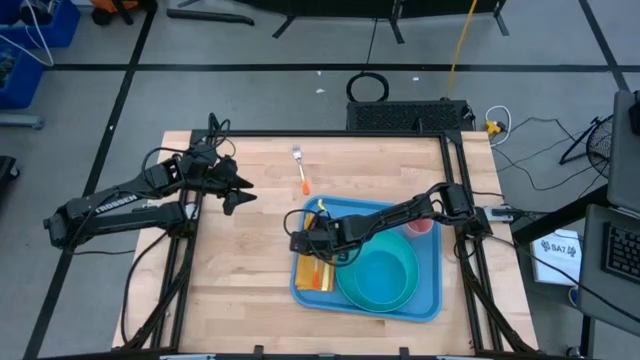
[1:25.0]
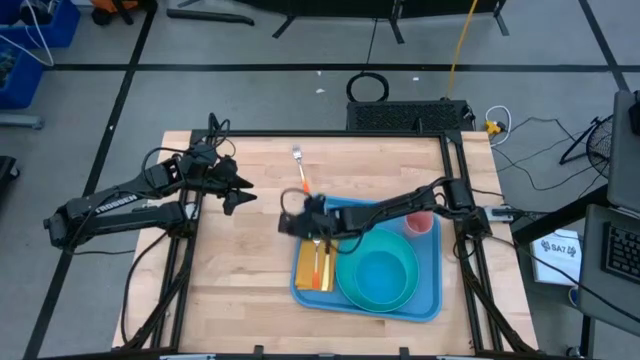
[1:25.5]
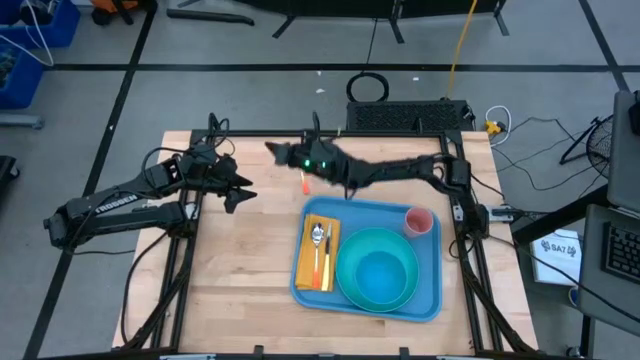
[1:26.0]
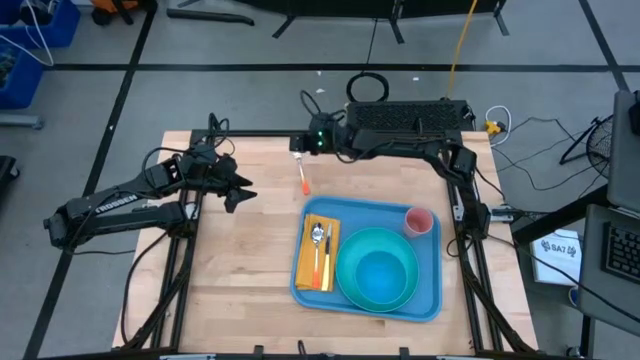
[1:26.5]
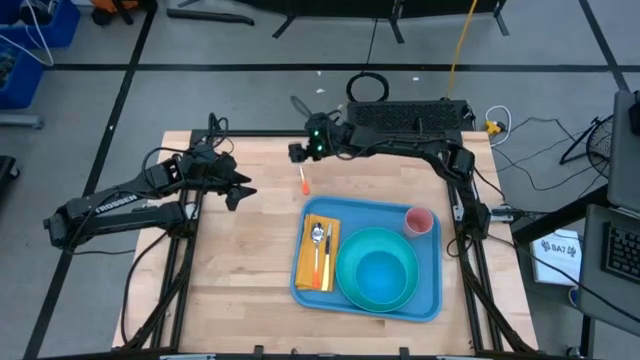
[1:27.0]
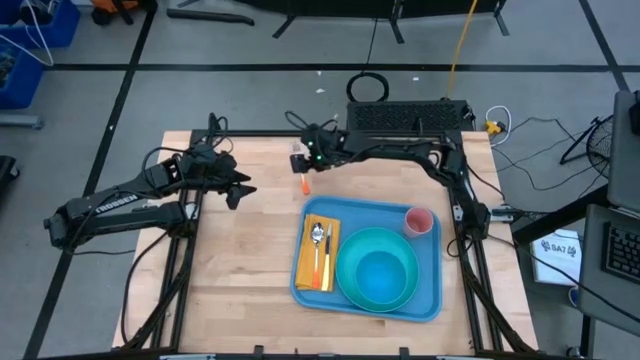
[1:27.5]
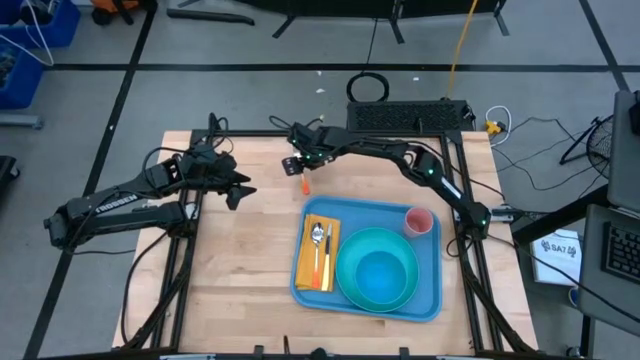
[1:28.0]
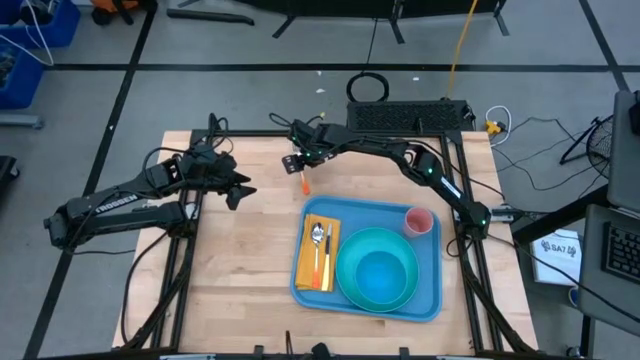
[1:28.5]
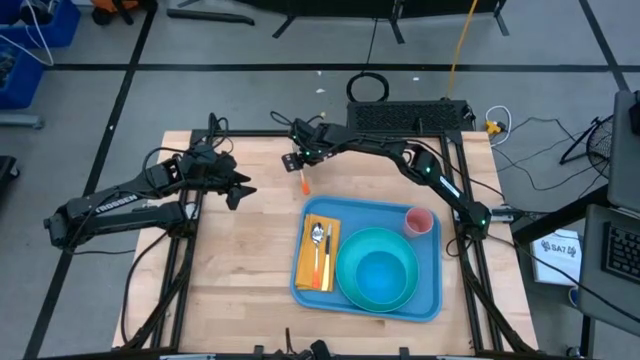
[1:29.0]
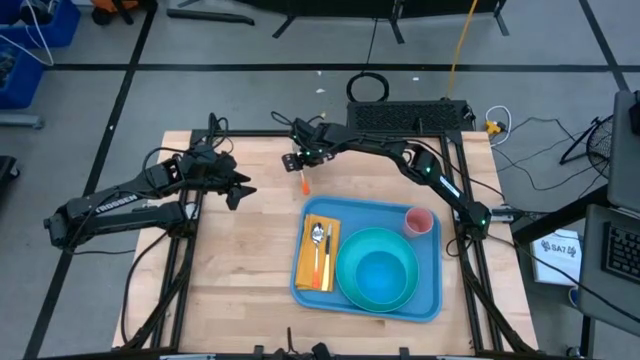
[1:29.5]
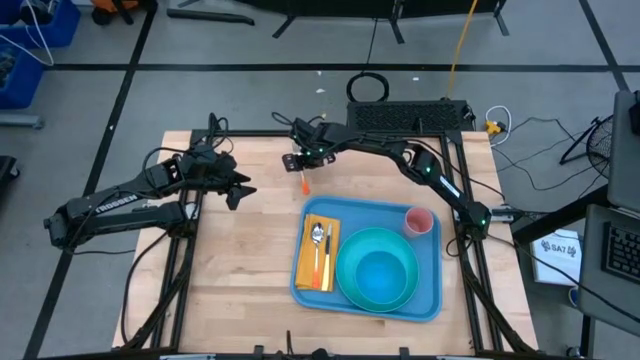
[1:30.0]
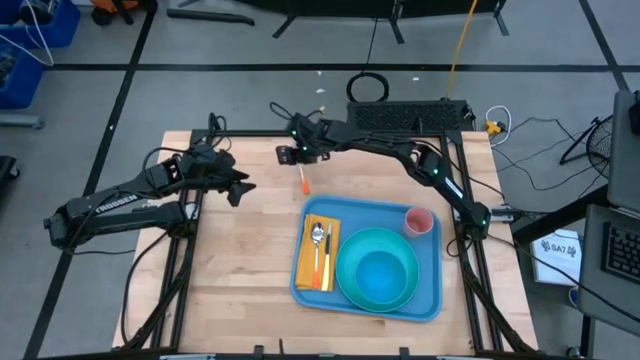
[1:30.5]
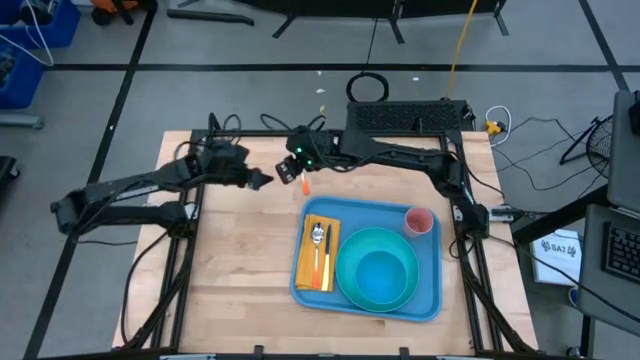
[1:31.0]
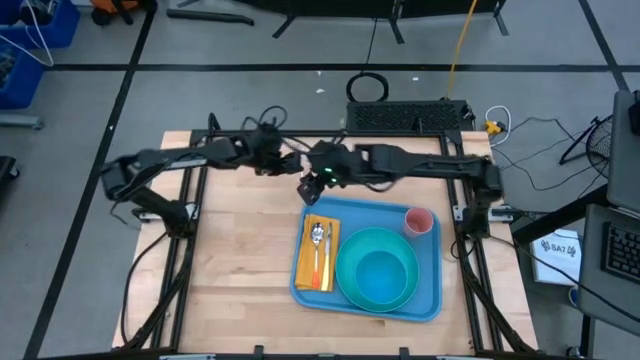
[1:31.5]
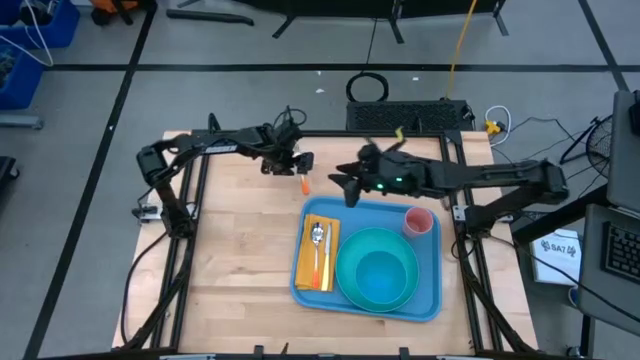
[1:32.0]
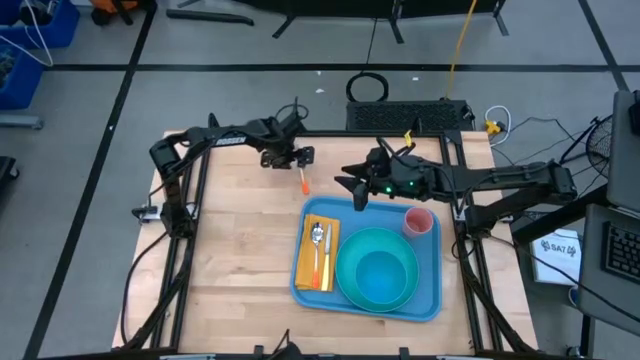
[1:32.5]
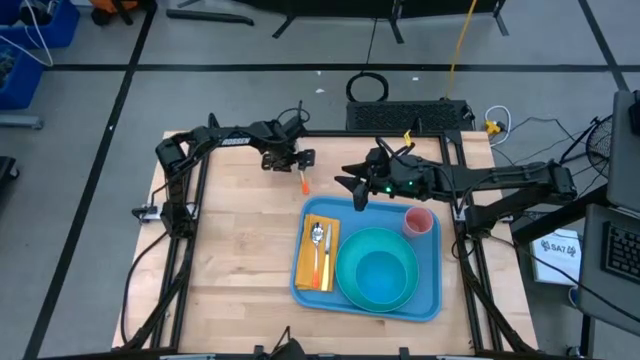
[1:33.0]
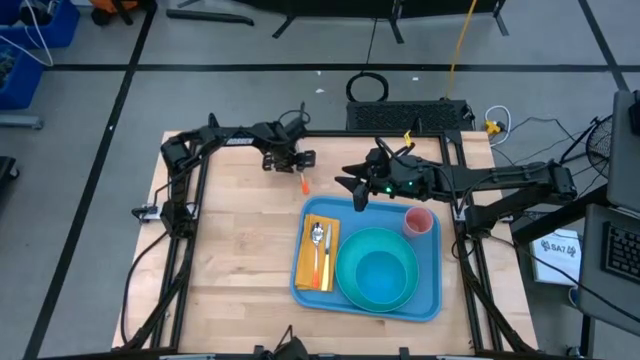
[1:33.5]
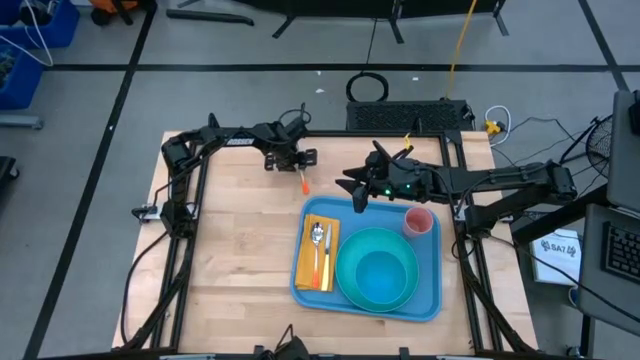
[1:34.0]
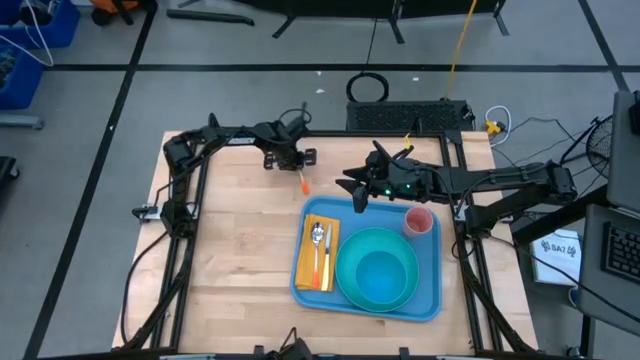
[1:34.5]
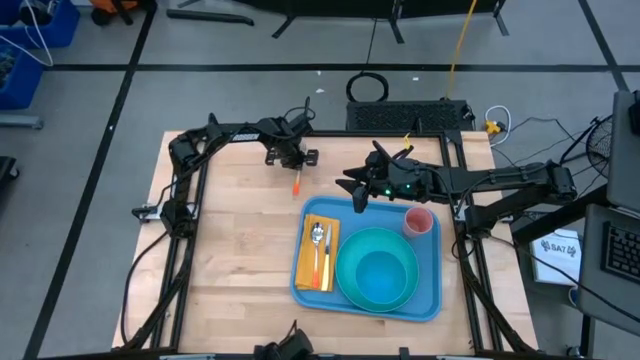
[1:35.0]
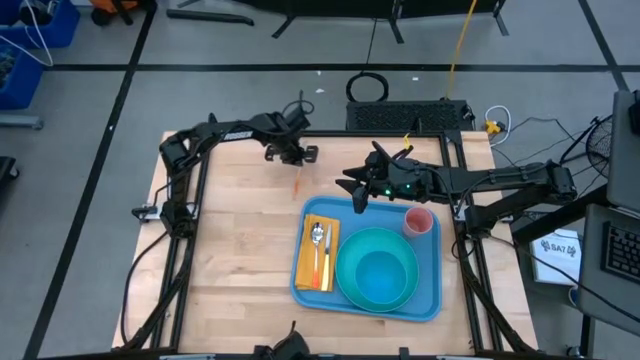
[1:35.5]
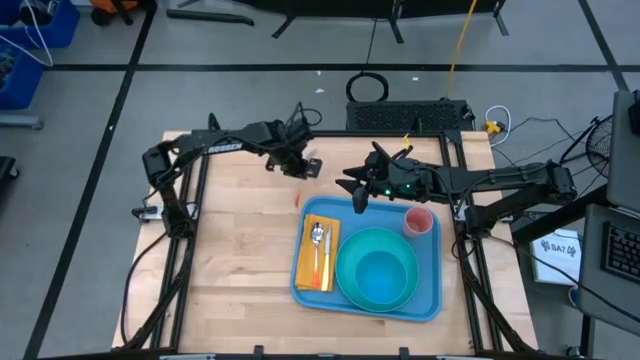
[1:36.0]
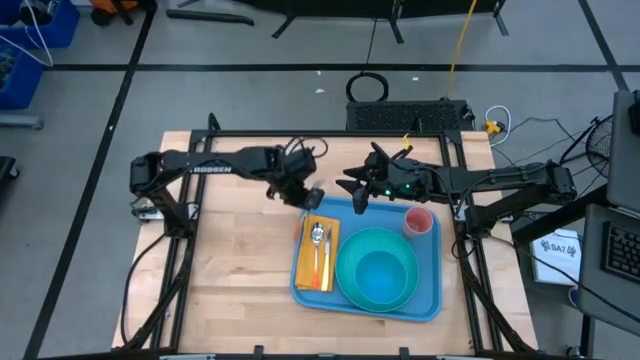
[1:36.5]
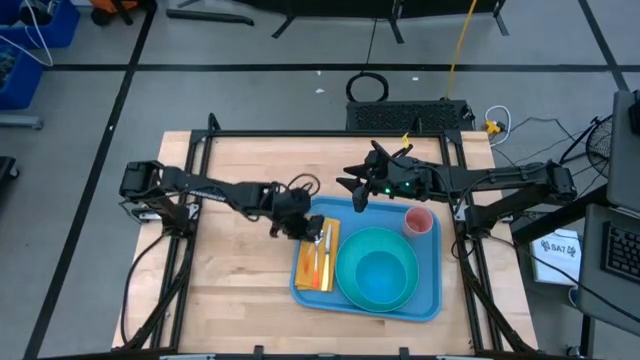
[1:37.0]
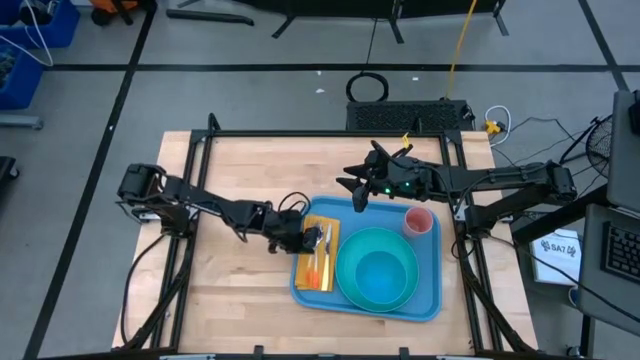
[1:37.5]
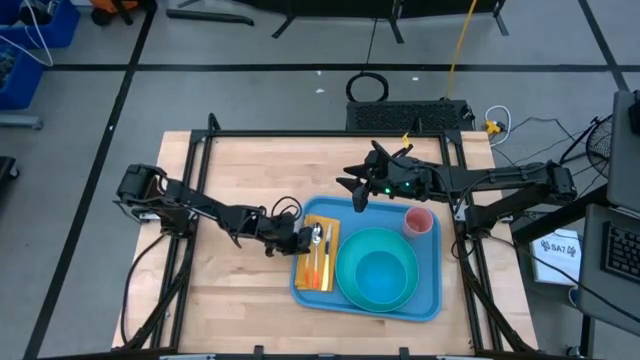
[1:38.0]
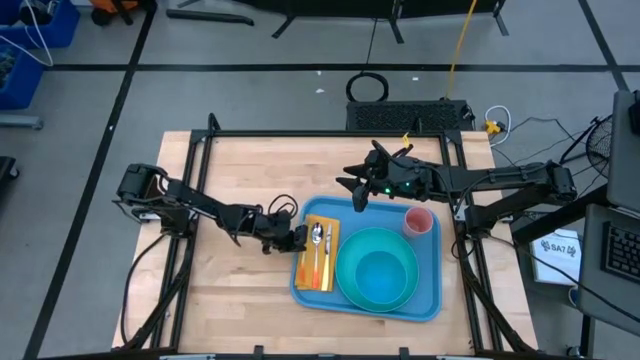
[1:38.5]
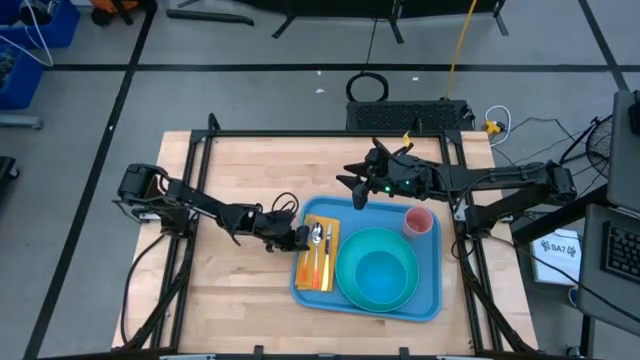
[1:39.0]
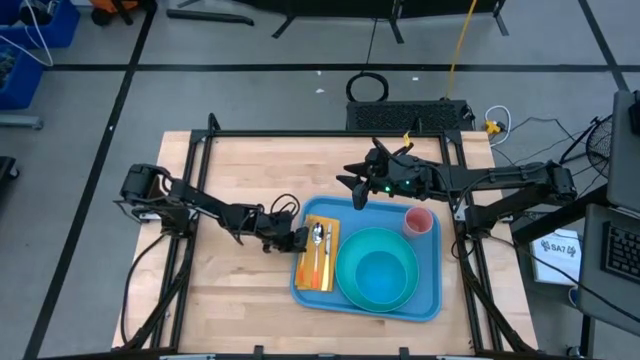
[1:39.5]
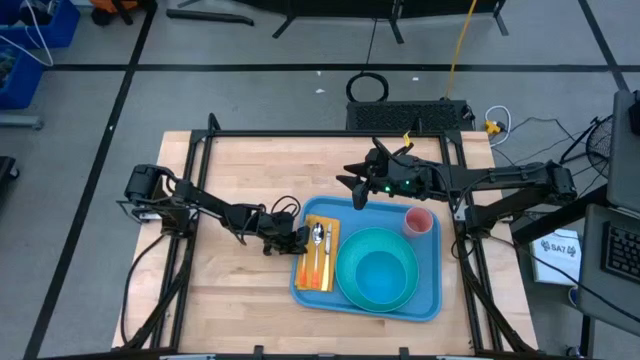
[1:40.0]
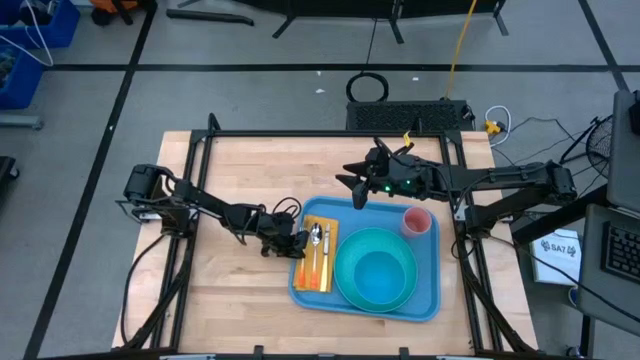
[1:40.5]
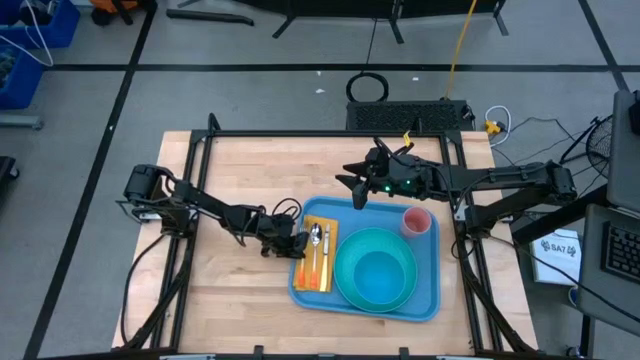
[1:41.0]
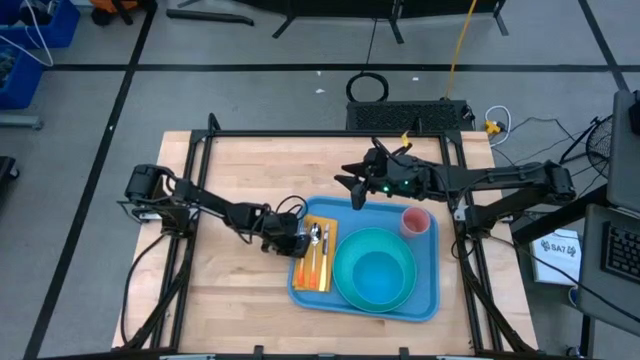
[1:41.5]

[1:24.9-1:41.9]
Task: Set up tray
Put the orange fork on top of the yellow napkin

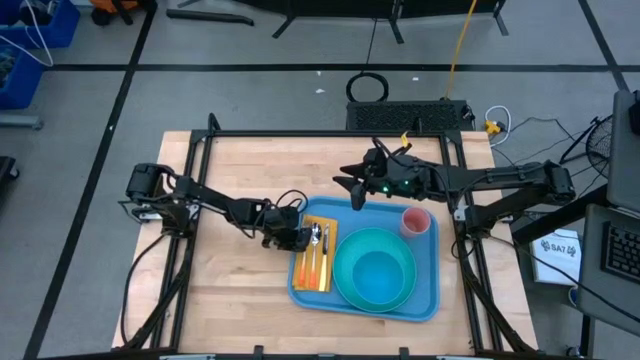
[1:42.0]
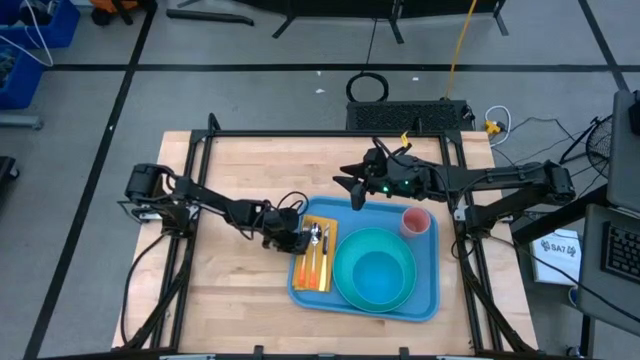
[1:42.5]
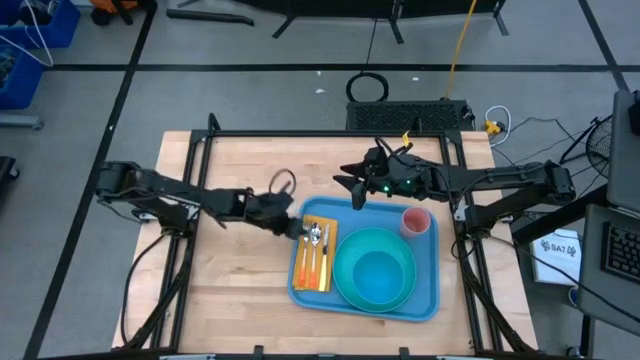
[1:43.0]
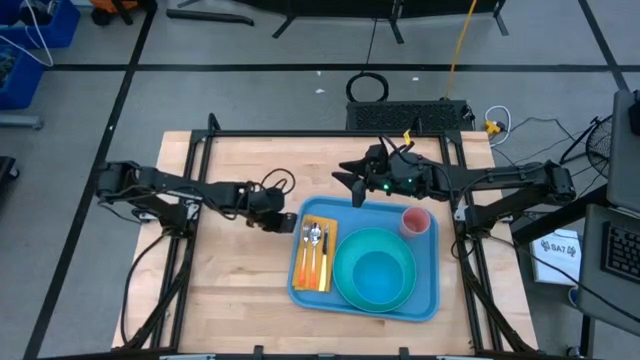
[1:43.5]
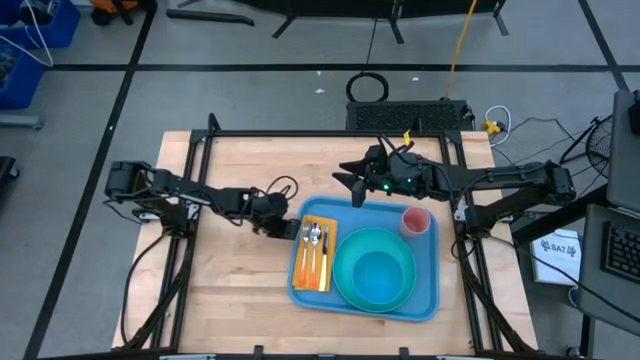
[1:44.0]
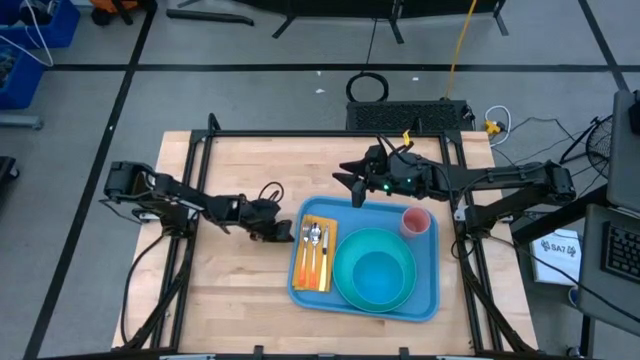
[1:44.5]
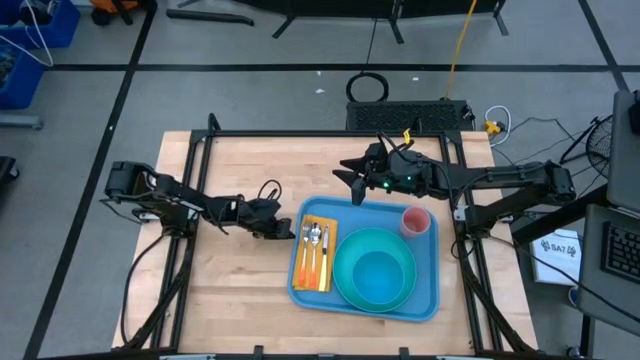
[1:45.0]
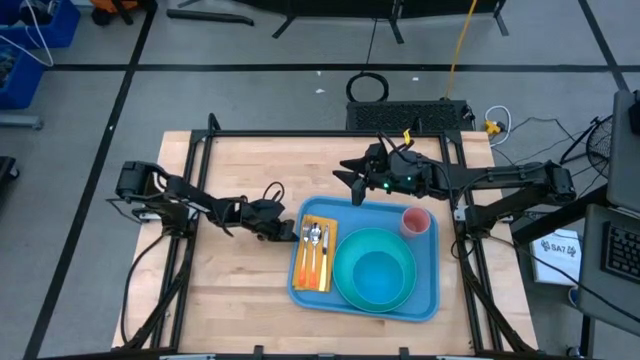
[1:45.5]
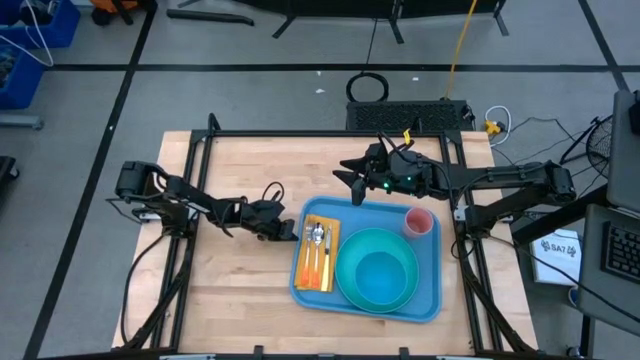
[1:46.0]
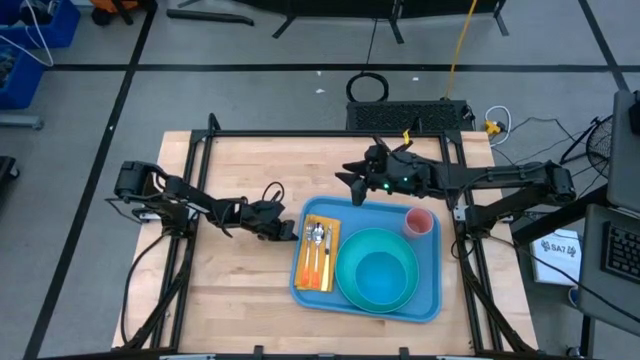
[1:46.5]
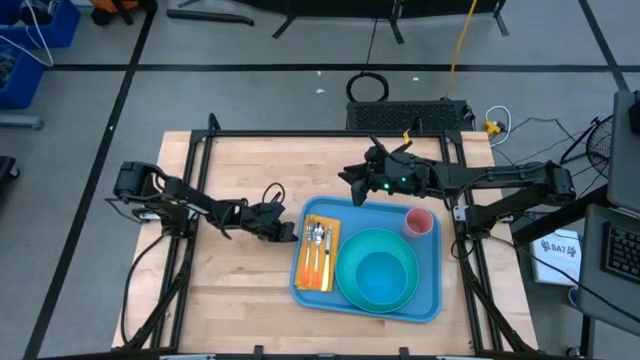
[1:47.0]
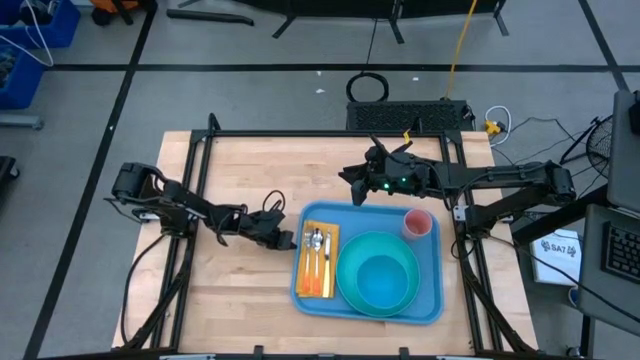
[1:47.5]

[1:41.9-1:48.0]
Adjust the blue blue serving tray on the table
